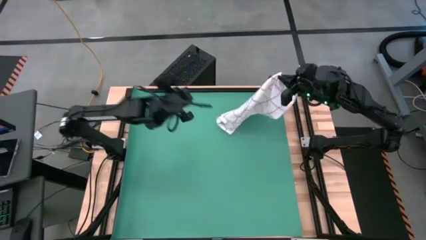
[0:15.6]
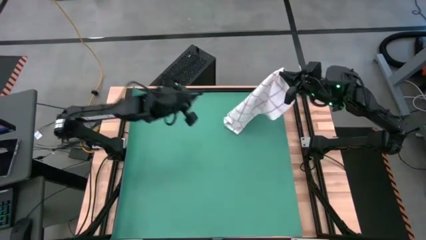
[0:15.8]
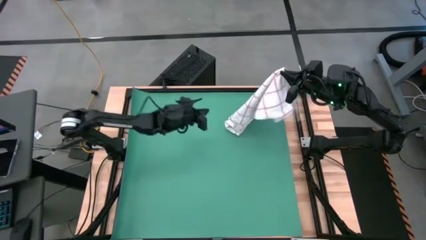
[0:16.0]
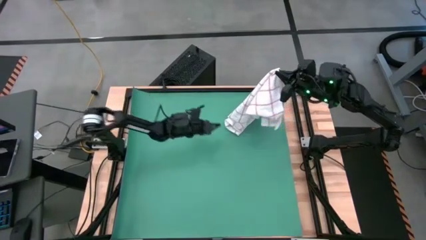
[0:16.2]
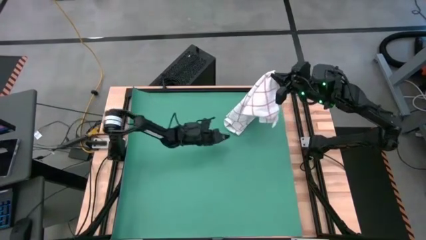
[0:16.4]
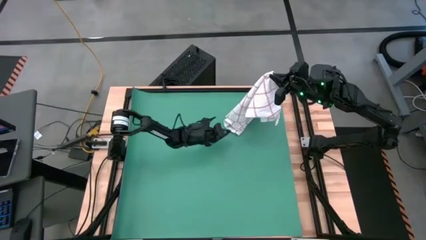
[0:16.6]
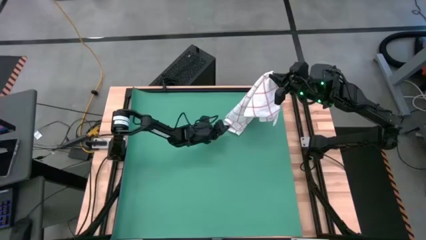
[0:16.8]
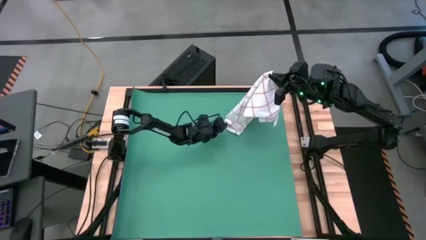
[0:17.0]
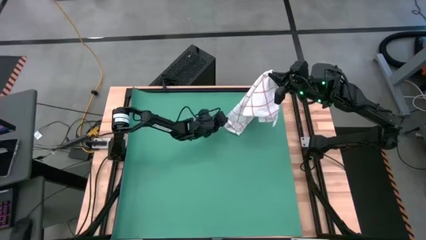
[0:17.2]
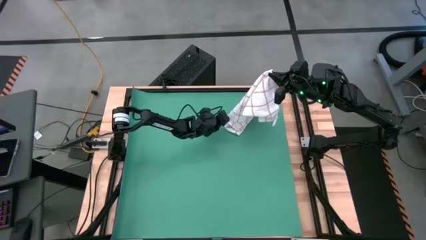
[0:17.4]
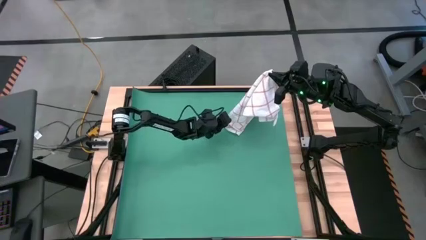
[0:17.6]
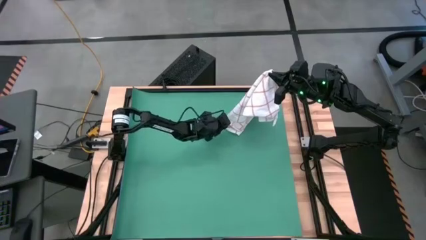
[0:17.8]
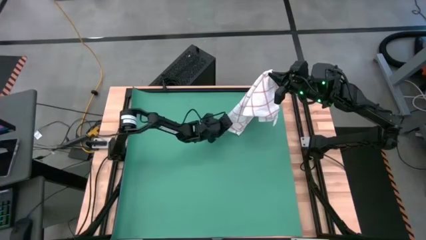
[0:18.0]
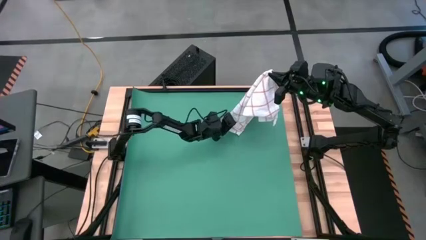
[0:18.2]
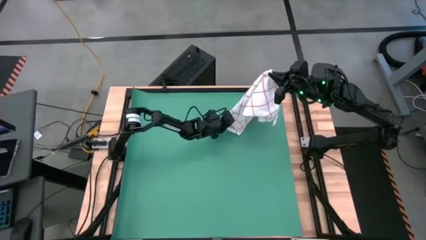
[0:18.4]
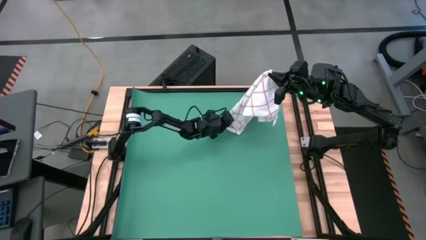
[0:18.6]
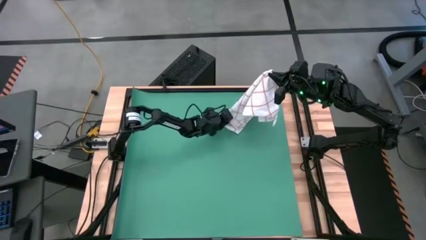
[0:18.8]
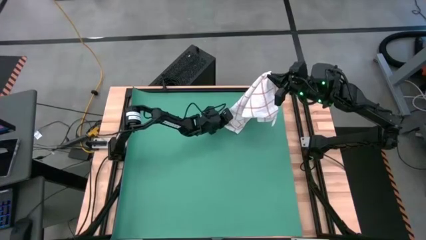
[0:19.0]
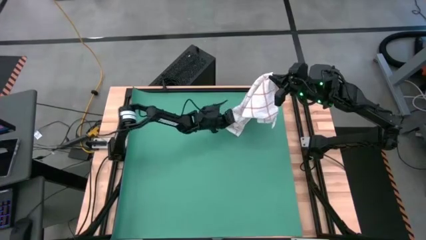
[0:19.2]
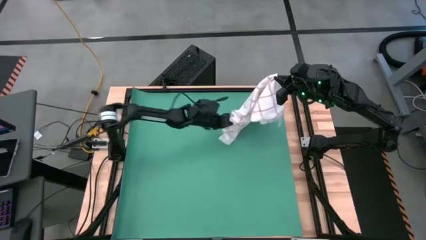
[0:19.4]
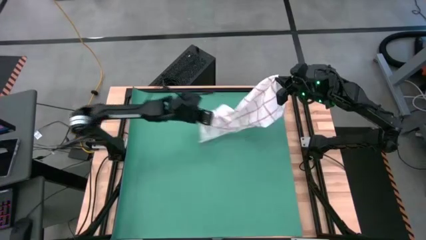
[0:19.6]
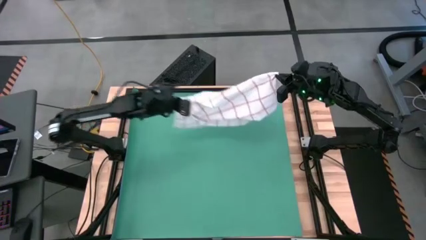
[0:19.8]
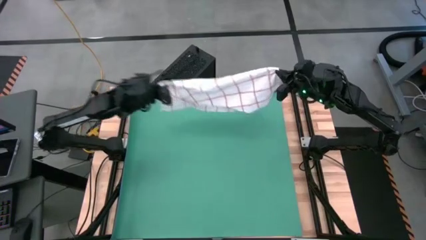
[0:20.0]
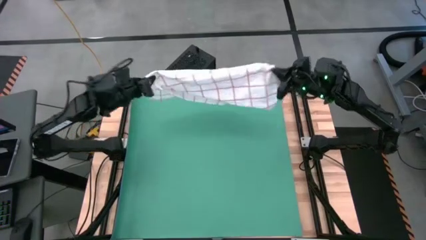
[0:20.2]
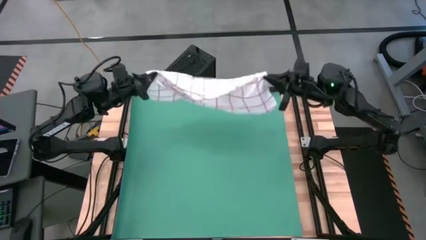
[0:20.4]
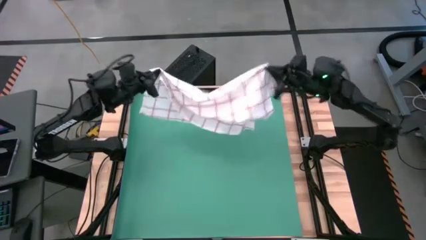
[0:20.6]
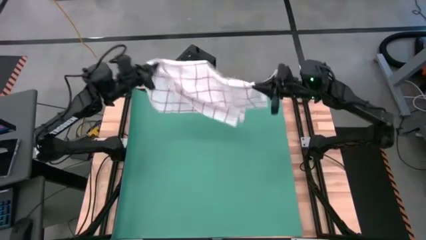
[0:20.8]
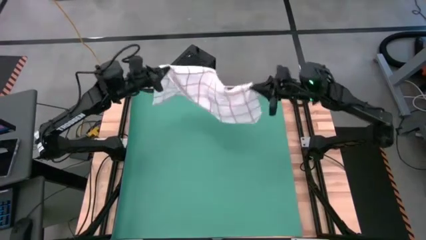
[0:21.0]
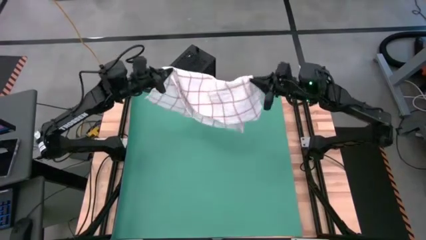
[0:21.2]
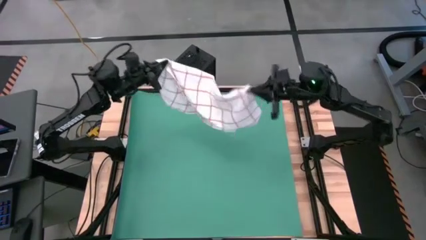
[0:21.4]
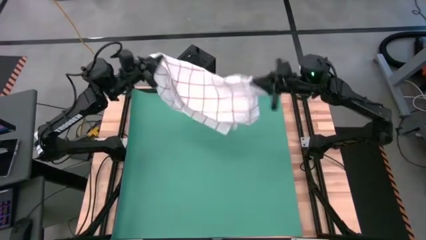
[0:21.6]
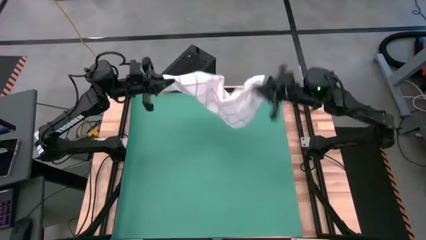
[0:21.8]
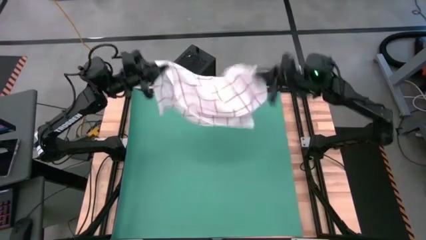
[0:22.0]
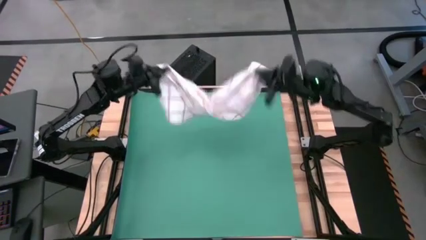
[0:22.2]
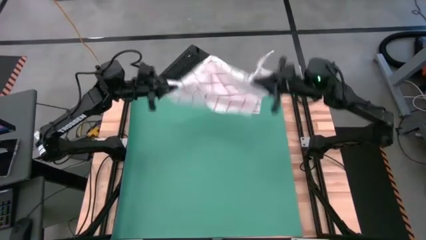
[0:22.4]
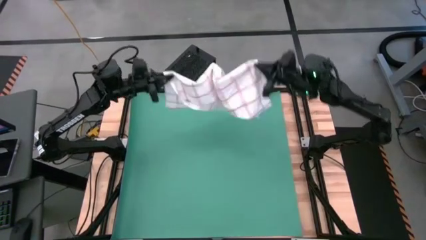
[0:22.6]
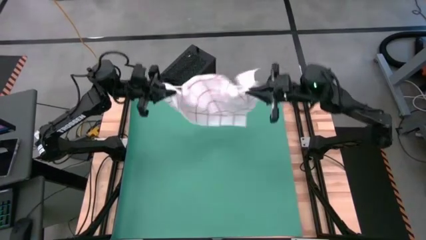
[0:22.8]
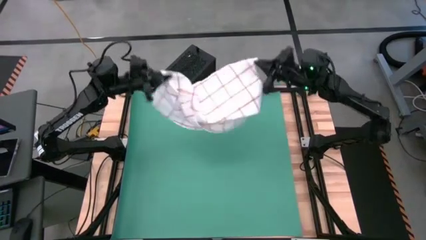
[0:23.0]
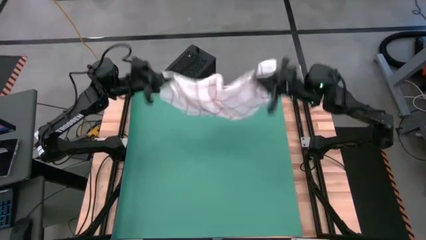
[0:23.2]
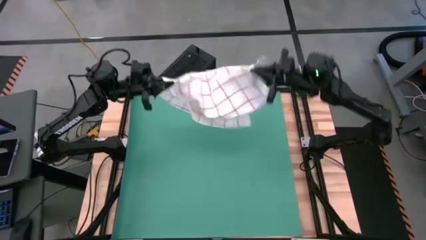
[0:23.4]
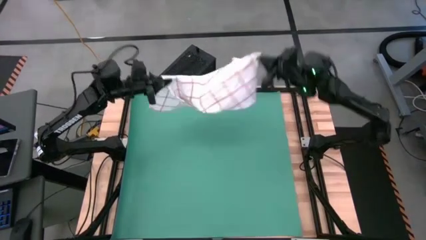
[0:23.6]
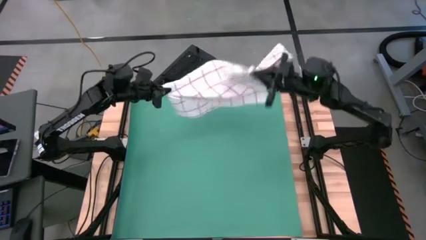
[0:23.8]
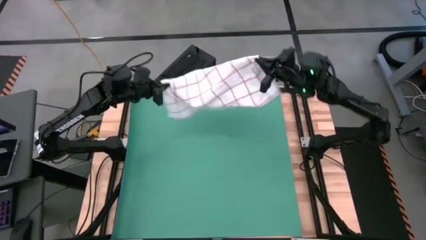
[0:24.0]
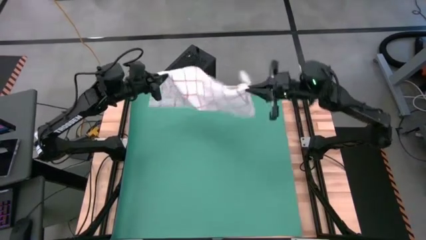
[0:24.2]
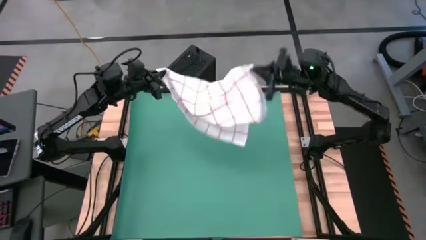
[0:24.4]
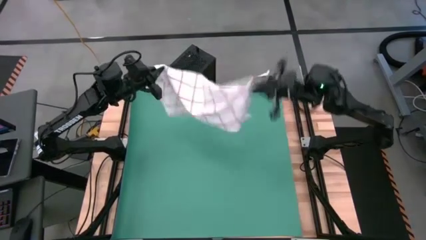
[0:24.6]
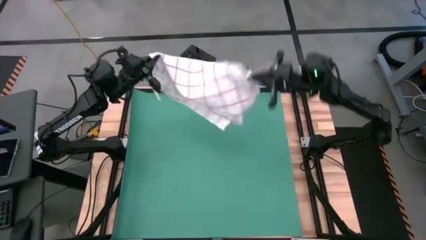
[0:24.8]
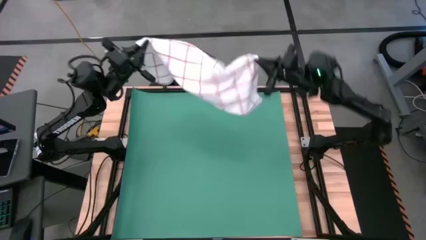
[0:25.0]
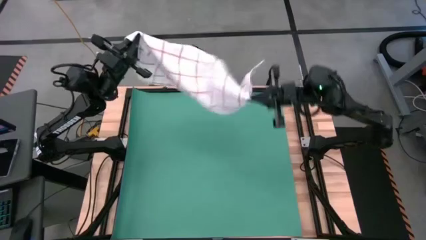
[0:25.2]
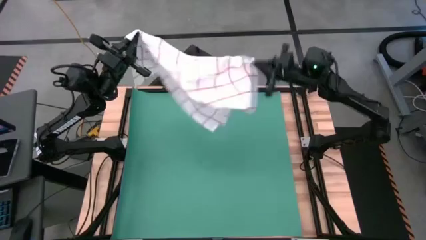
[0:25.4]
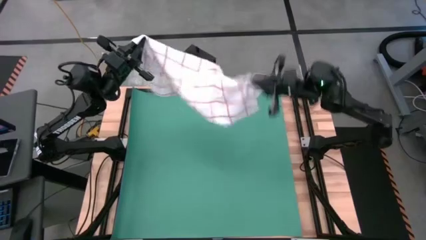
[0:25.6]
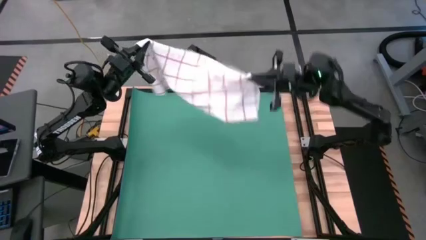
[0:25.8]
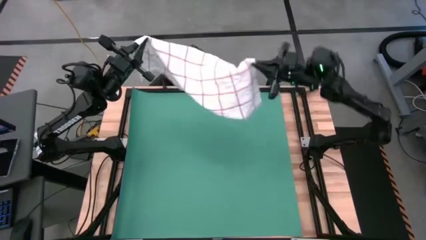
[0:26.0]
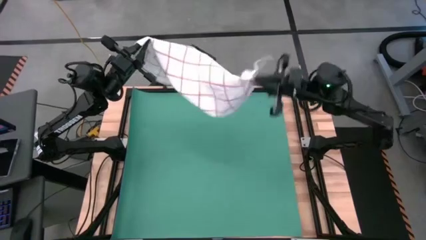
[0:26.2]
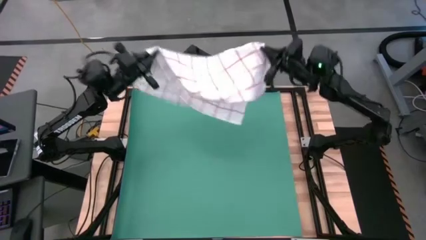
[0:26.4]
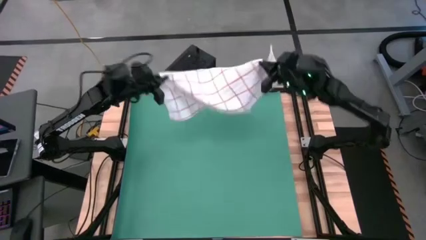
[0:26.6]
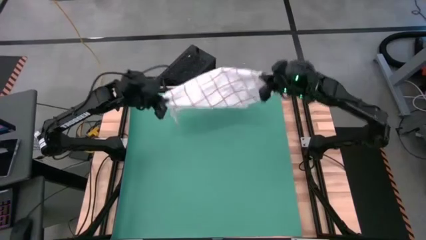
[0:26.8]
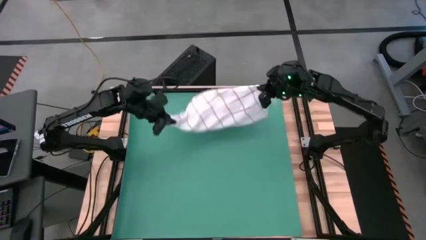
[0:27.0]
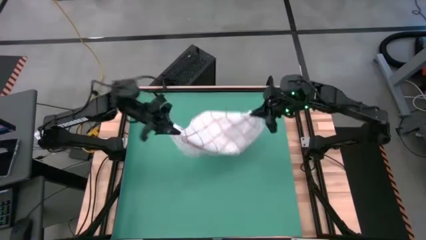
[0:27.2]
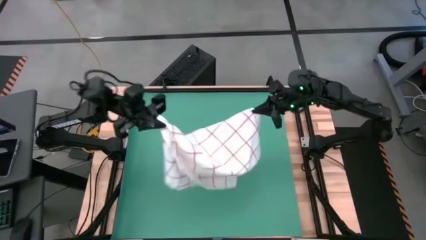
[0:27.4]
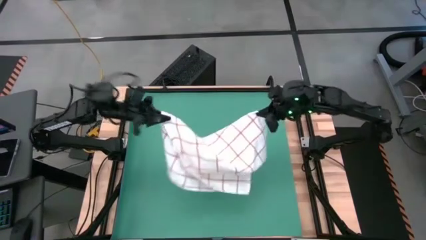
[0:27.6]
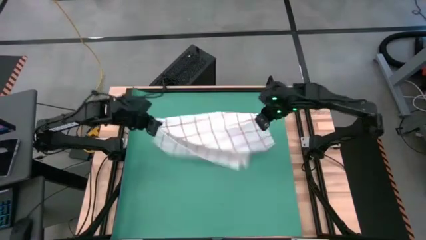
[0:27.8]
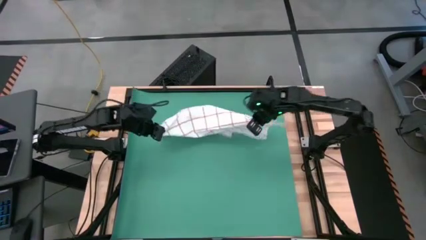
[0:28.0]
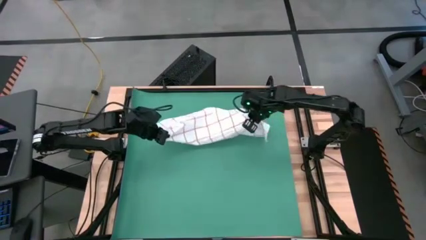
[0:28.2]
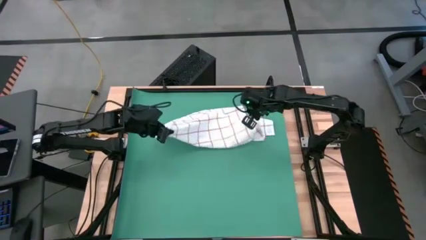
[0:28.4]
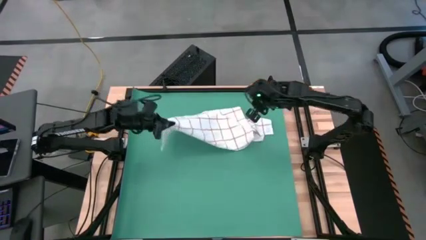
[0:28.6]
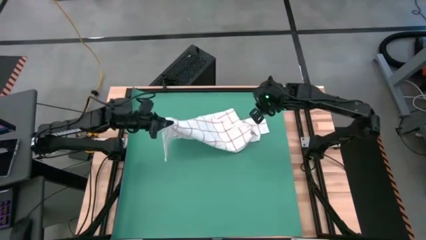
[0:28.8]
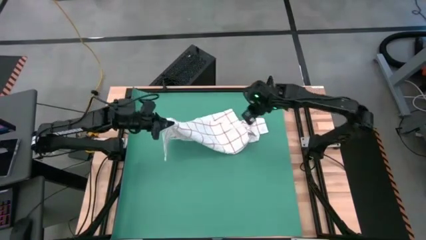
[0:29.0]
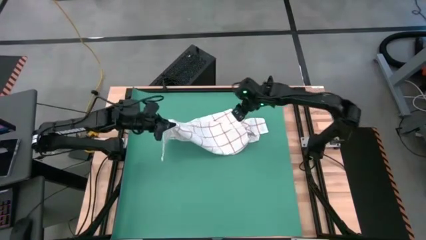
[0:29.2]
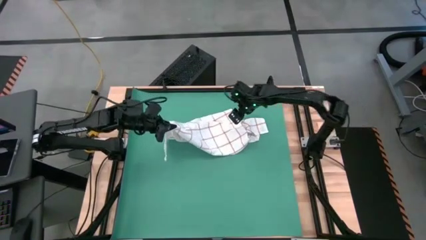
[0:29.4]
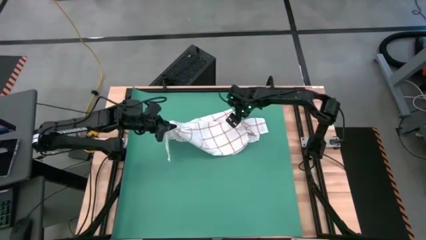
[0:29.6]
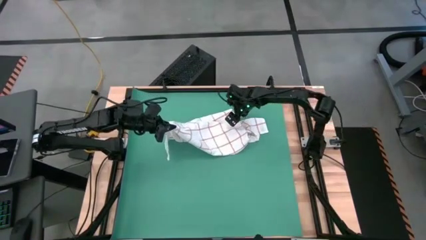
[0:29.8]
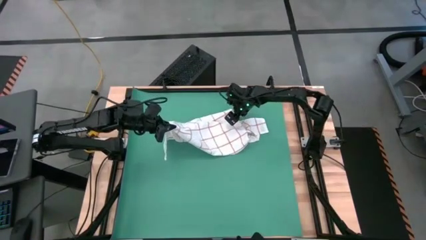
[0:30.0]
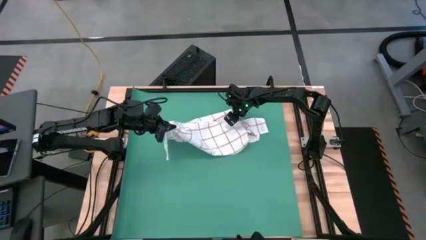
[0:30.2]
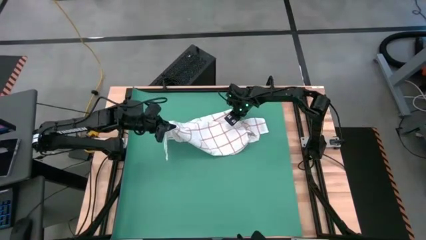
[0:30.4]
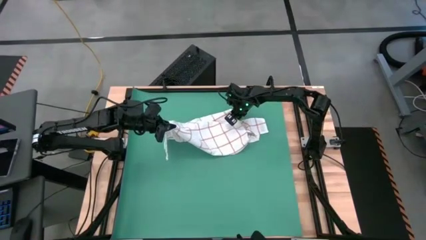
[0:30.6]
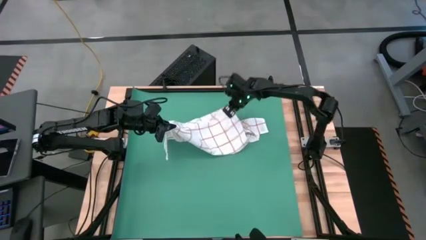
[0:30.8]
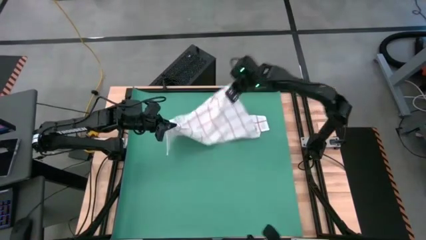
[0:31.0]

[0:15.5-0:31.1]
Task: Roll towel
Roll the white towel
